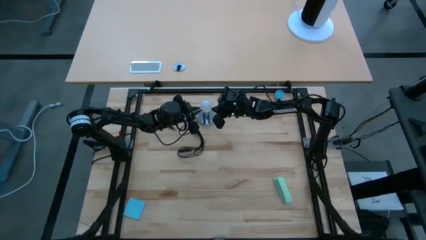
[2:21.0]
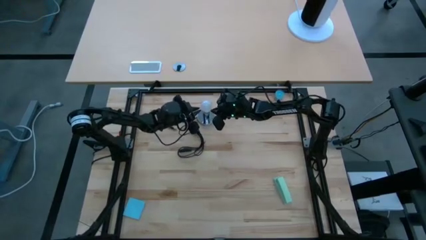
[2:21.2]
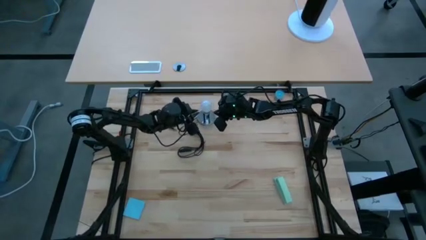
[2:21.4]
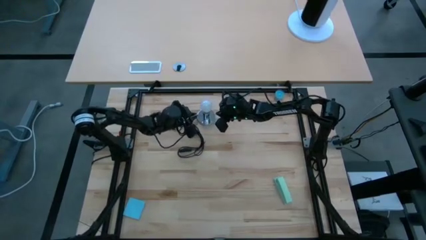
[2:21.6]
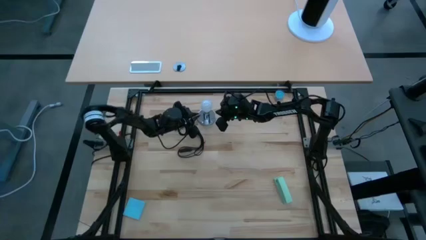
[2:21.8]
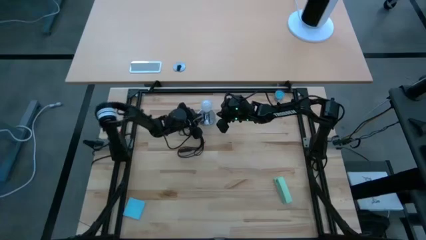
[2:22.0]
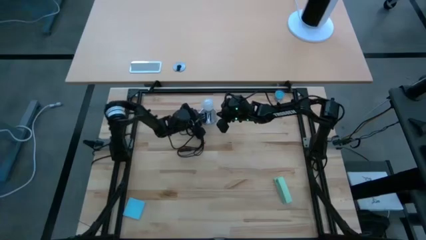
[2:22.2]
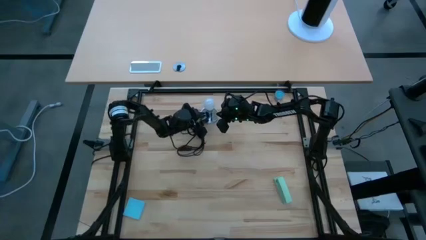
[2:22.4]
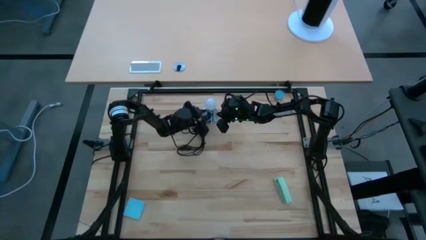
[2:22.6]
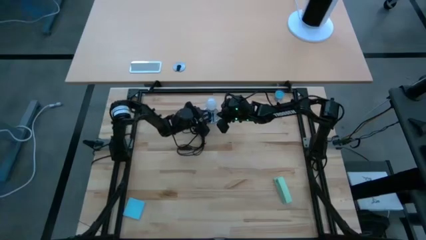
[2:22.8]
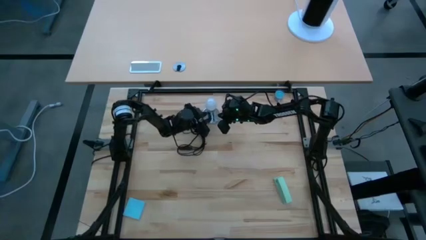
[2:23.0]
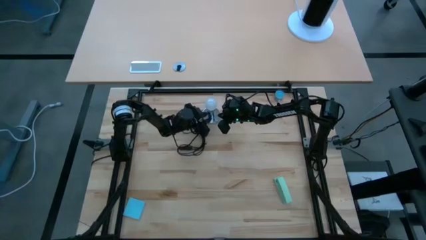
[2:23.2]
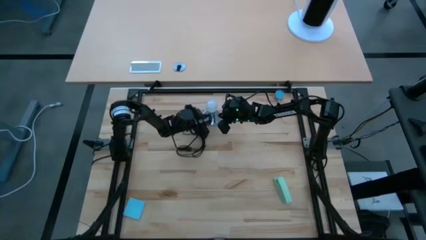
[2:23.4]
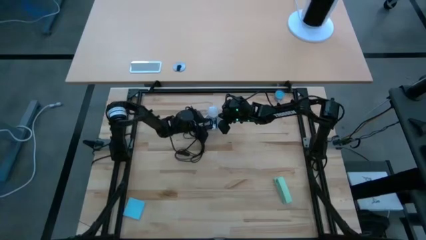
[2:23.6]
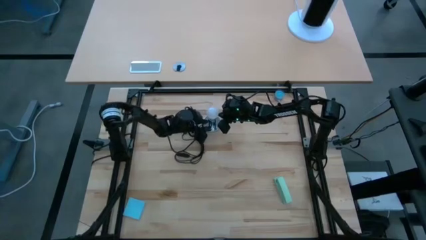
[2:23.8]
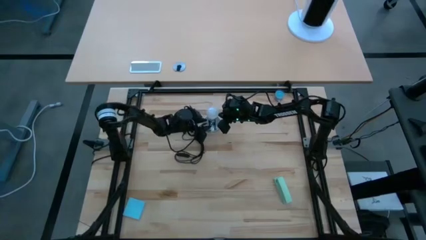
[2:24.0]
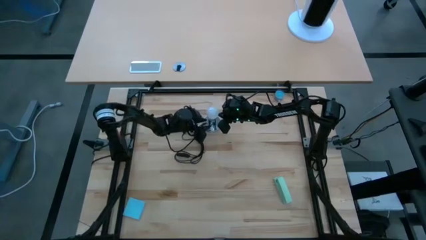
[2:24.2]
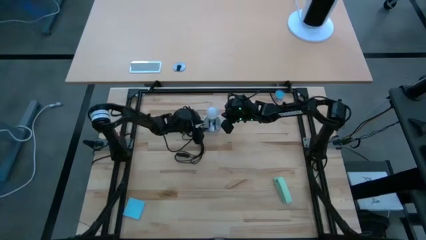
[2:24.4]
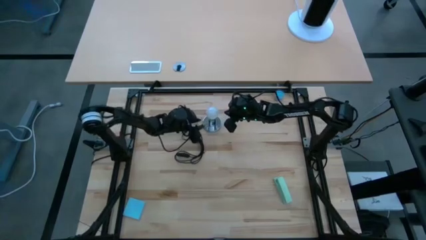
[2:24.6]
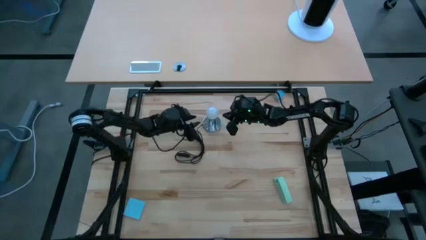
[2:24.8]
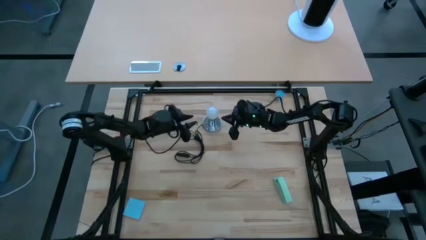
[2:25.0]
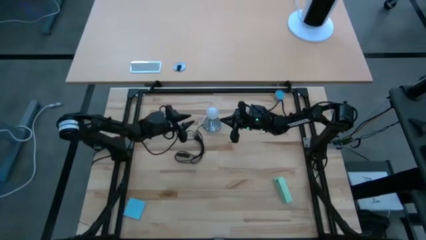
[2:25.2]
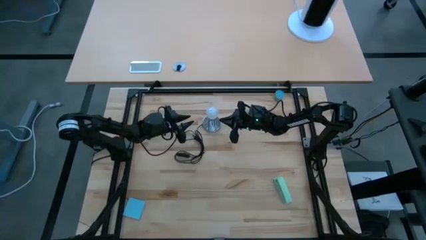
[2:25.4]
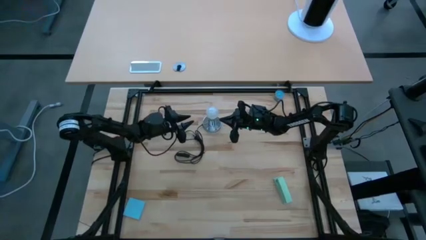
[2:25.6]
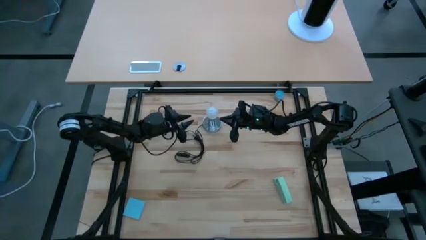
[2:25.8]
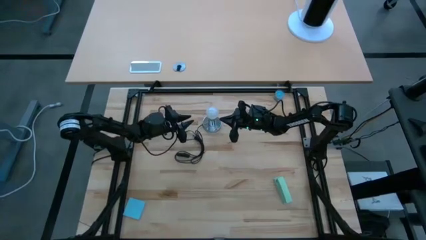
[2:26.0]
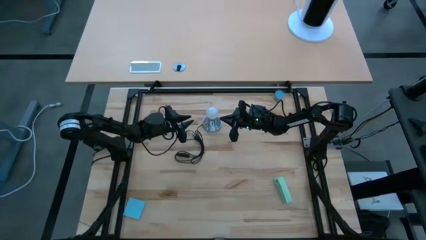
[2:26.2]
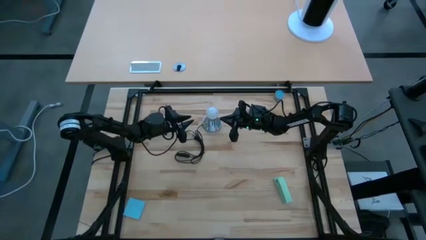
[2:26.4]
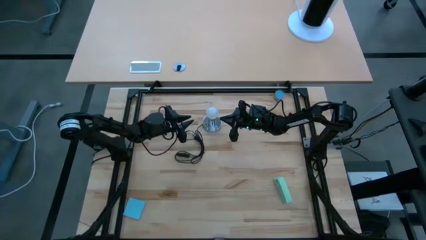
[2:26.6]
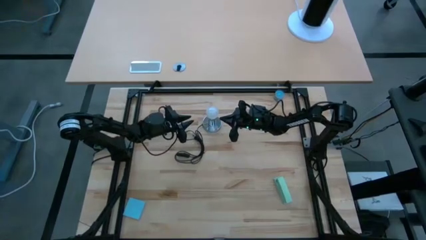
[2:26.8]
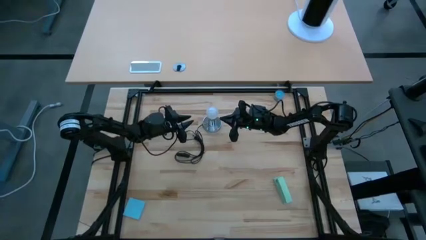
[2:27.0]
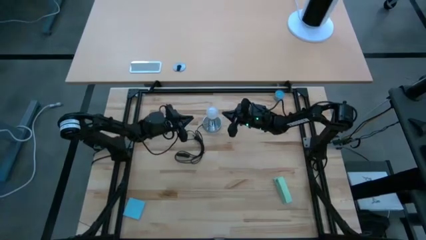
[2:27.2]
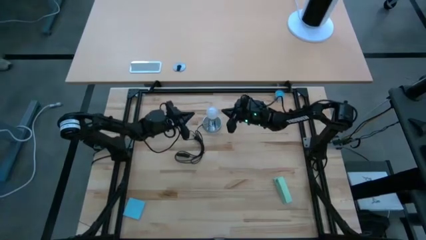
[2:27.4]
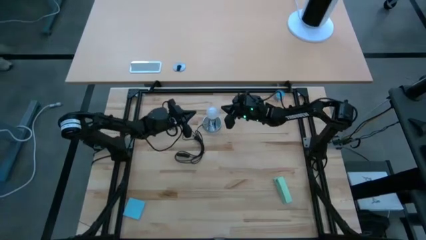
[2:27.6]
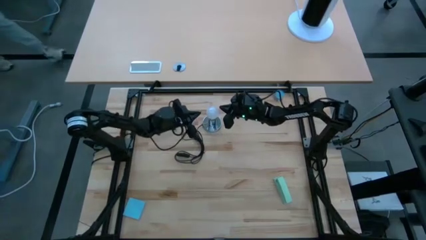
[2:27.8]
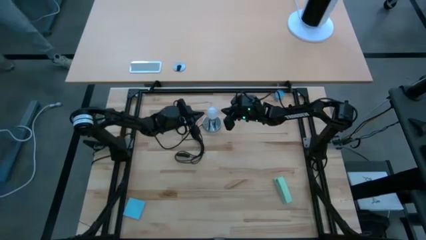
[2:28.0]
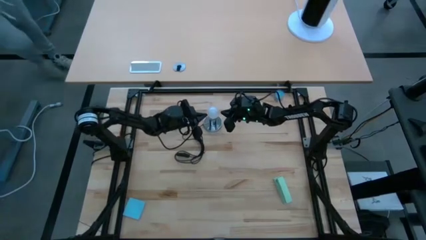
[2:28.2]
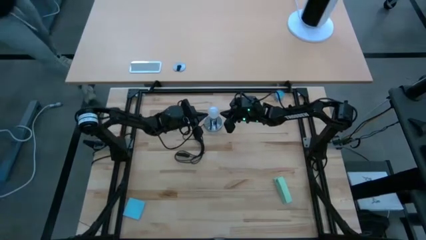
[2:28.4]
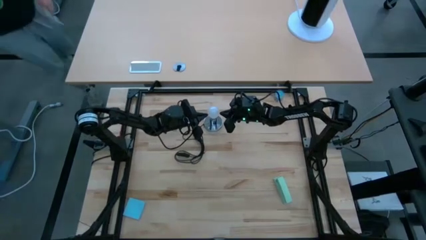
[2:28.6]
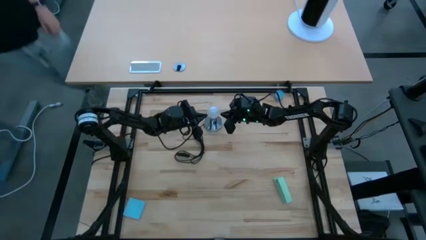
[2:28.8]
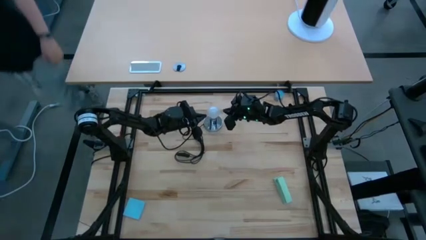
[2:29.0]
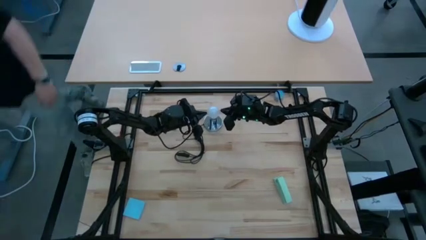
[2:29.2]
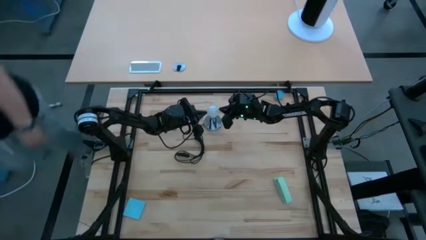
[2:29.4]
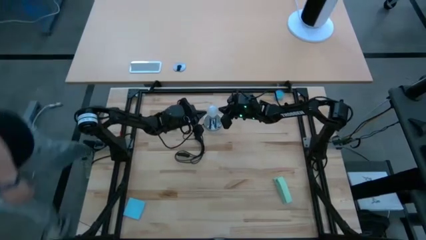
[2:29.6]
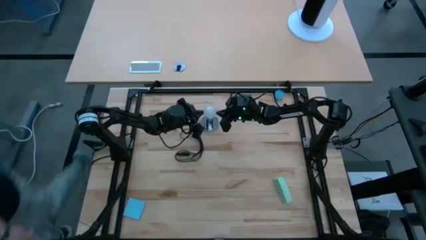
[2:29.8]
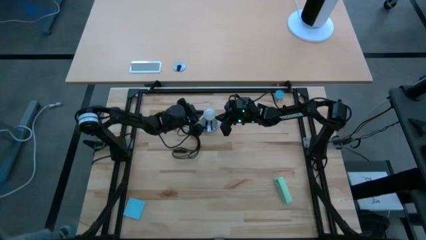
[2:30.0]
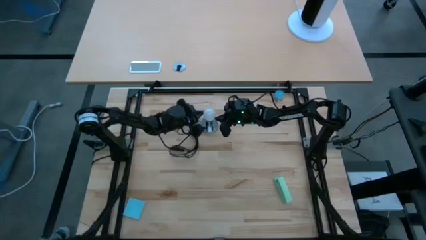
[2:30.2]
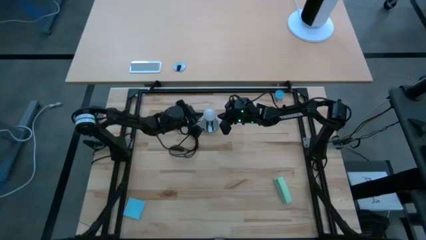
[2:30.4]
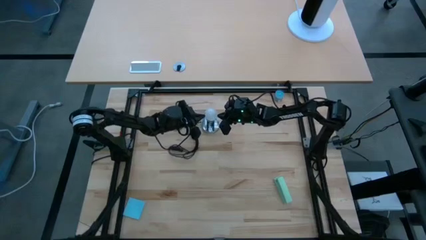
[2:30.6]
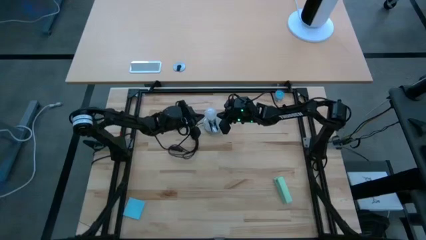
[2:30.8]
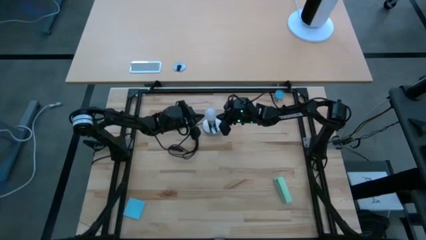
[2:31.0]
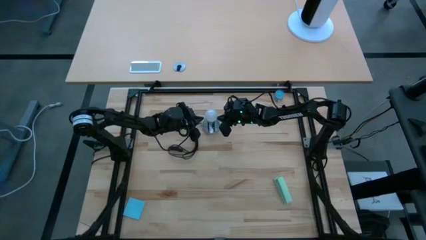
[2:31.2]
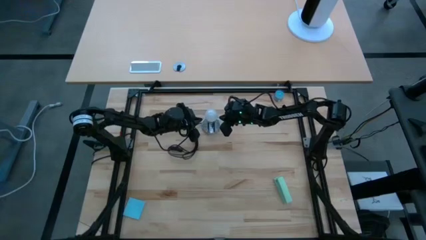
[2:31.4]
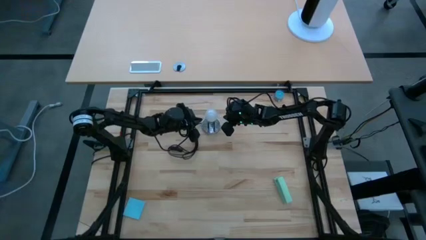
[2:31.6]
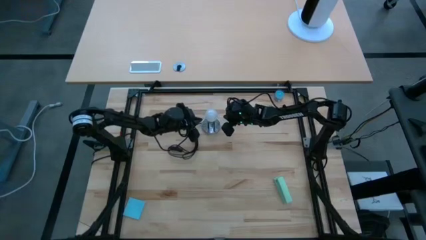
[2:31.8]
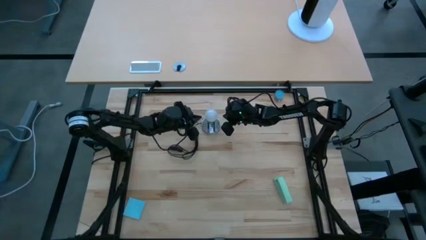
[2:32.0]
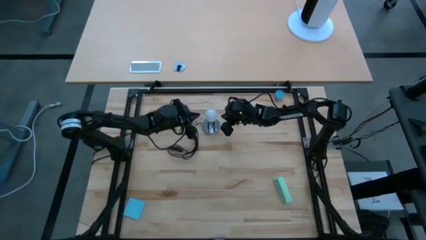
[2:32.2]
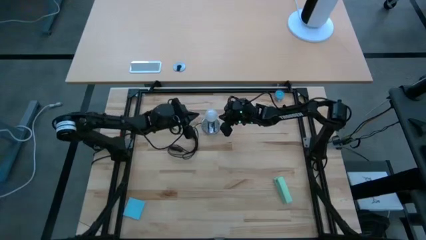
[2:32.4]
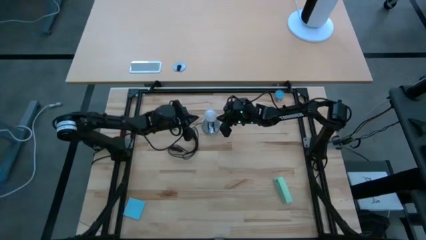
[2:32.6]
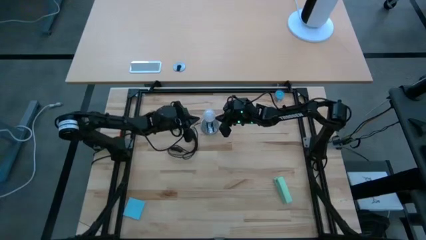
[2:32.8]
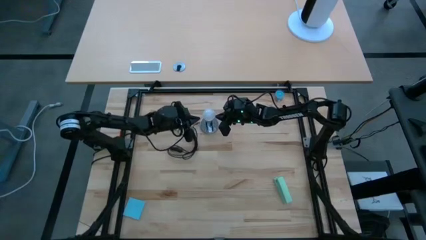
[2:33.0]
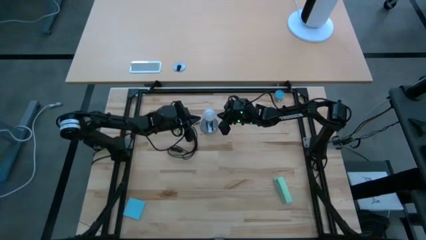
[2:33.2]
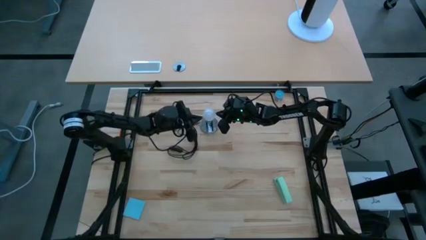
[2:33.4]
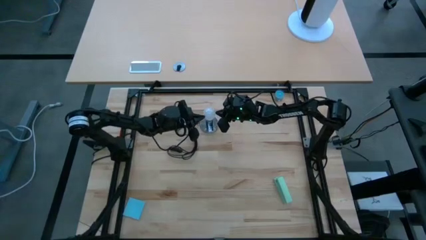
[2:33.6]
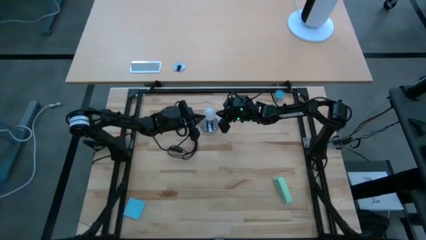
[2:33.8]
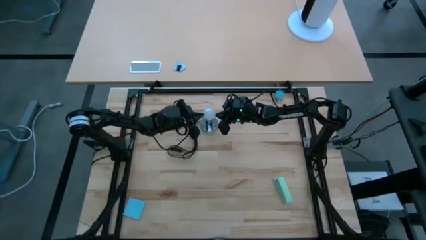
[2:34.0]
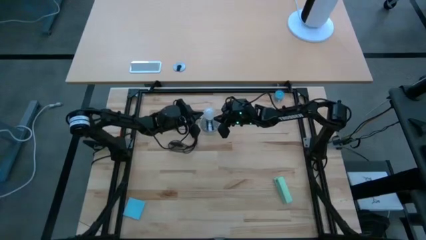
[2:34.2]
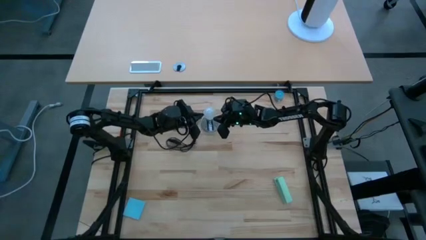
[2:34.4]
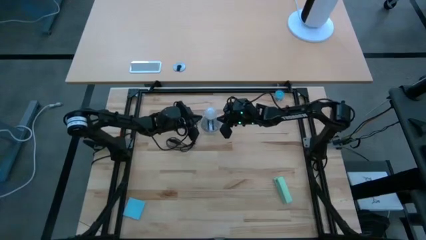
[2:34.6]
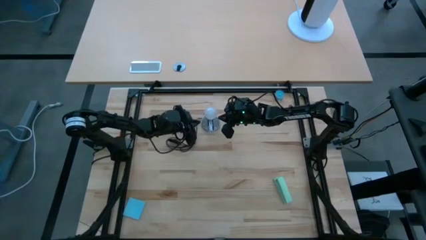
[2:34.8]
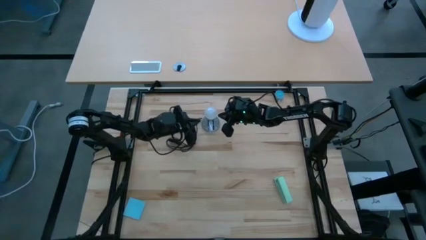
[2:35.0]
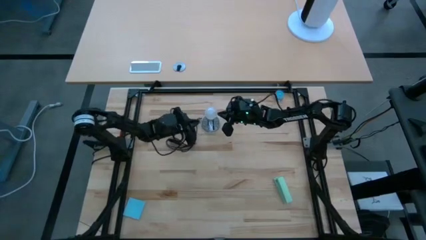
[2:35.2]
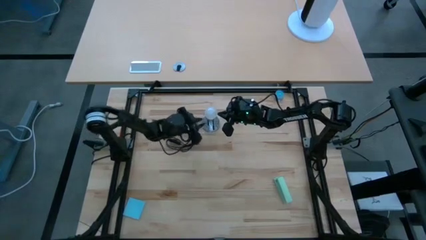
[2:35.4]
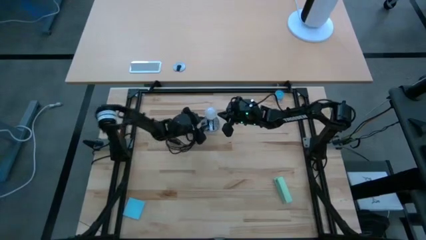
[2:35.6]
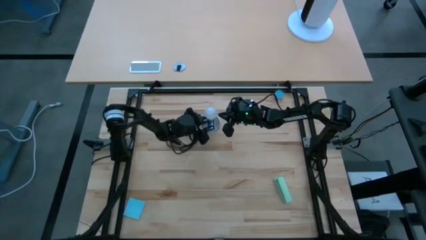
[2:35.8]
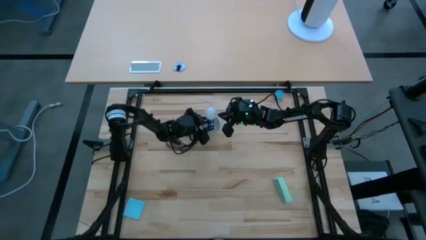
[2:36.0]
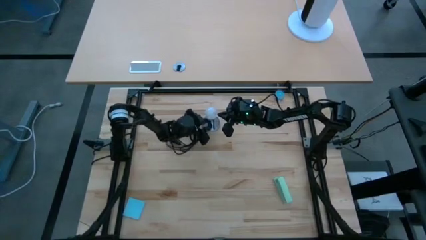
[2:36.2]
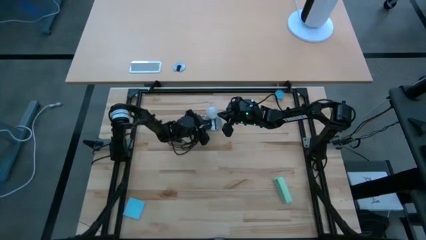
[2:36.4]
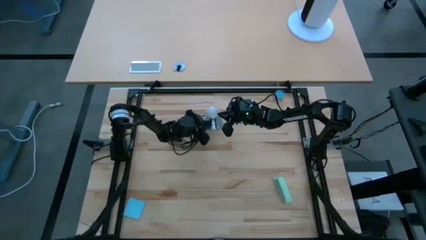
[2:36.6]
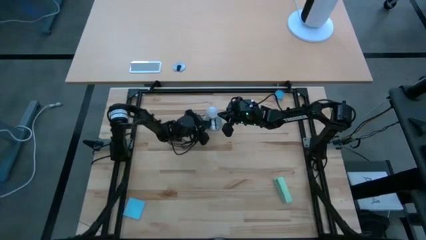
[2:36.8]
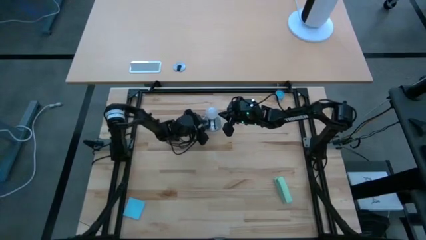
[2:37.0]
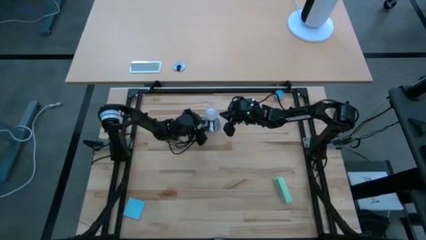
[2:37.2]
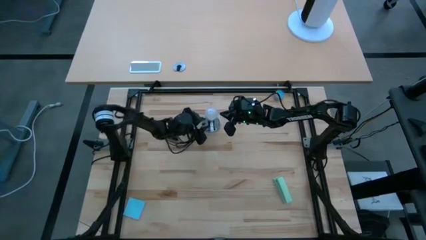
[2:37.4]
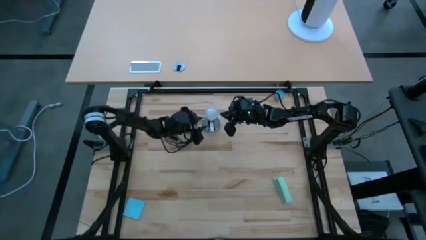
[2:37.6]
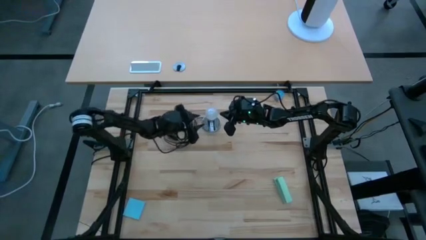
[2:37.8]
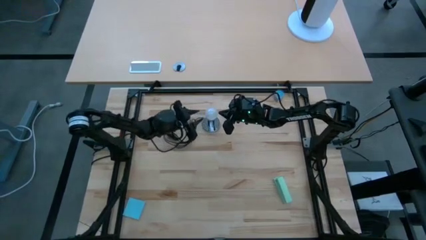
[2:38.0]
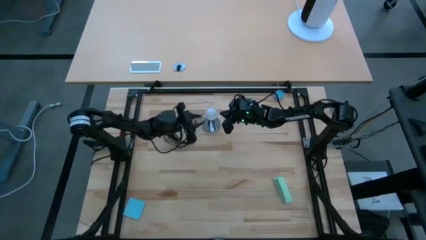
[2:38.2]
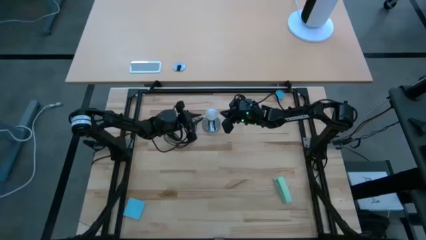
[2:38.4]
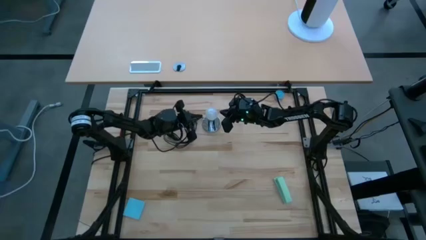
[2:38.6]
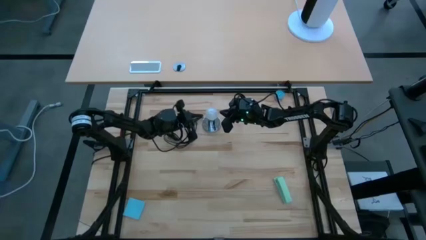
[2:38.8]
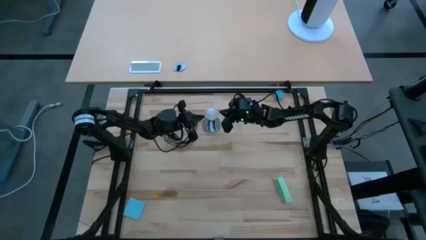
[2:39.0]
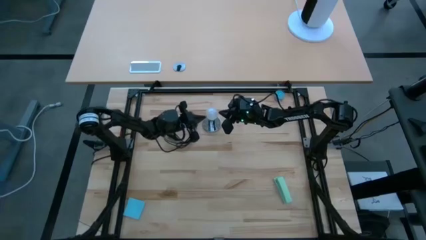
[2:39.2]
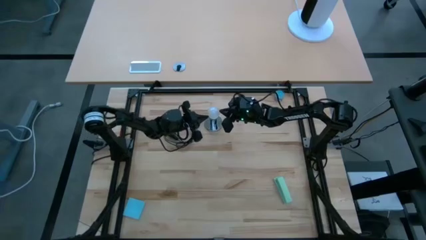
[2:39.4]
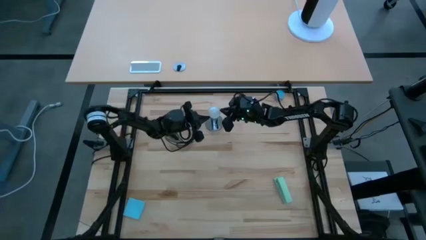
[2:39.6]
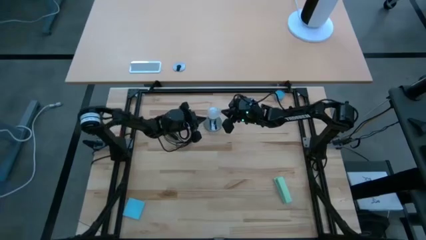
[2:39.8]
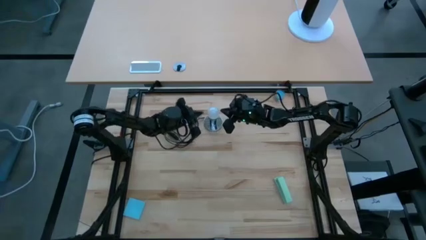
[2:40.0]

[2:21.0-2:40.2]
Task: Screw lightbulb
Insert the lightbulb into the lamp
